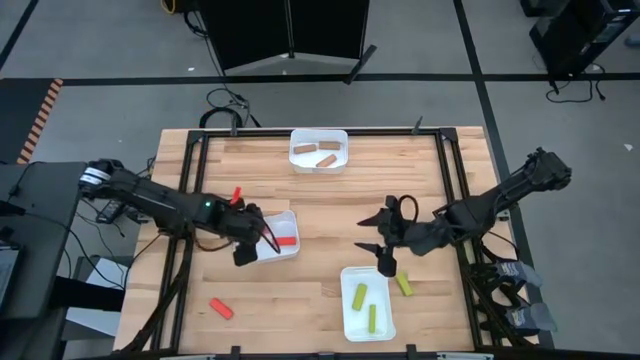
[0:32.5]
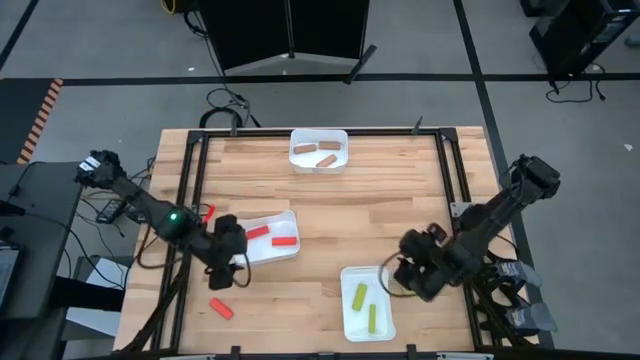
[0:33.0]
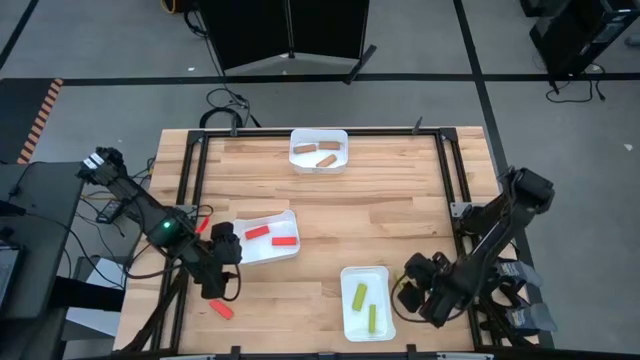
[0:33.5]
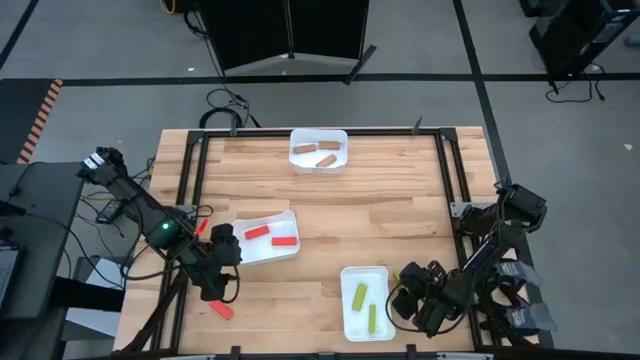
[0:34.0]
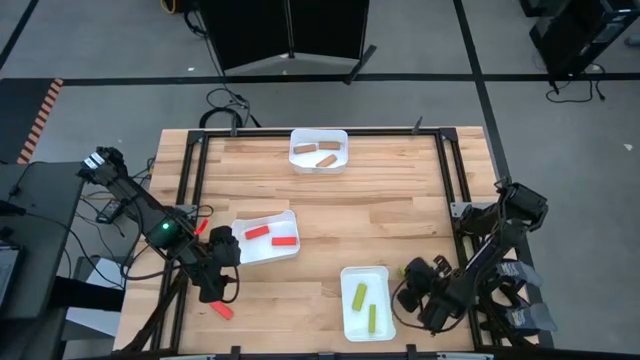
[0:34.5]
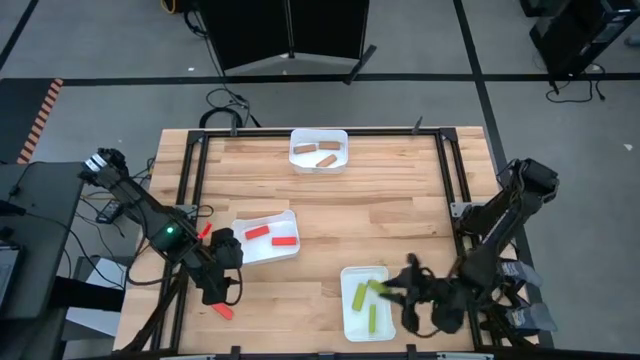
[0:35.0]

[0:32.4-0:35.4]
Task: Sort blocks
Put the yellow green block into the bottom white bin

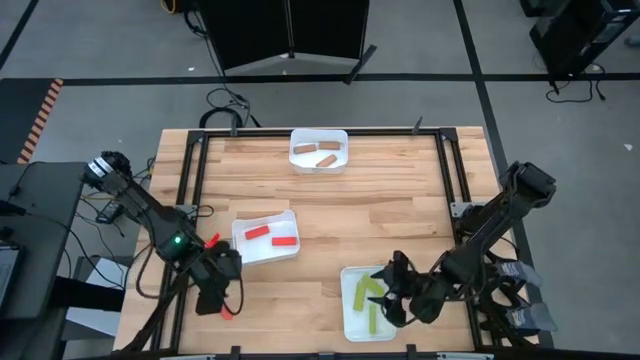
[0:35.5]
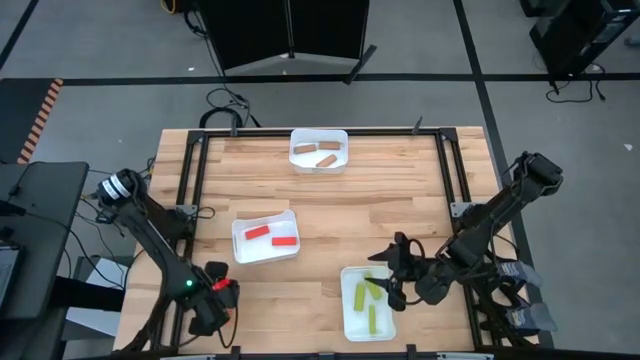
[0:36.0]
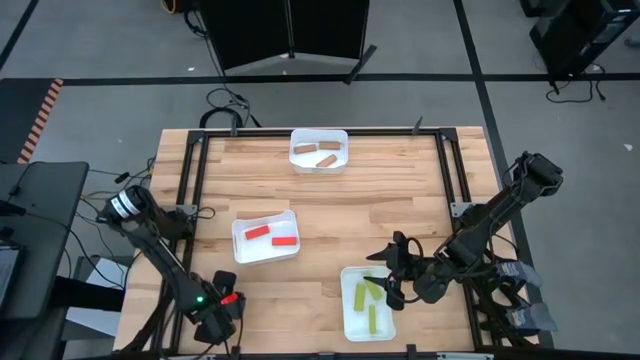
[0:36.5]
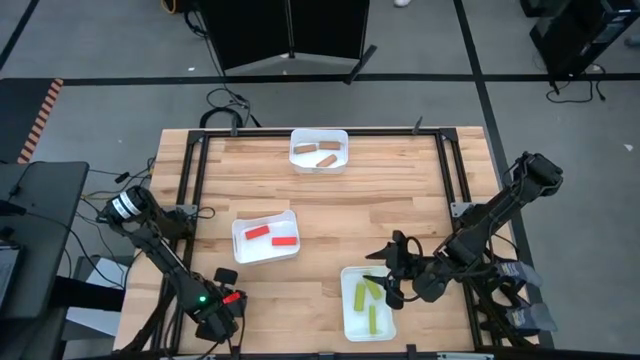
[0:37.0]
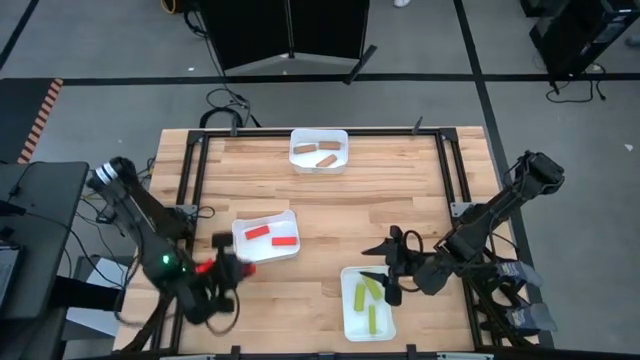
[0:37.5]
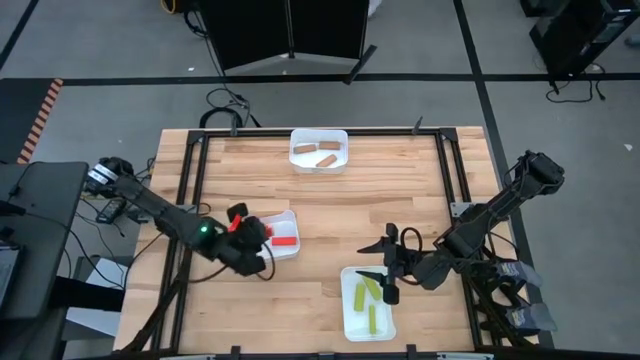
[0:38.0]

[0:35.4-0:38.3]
Put the orange block into the middle white bin

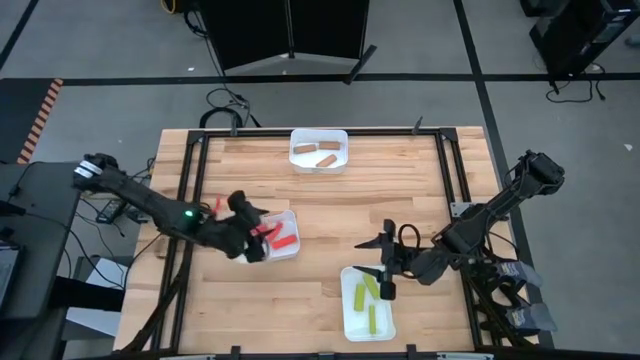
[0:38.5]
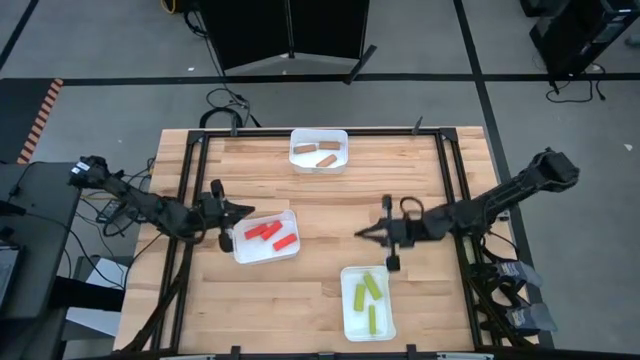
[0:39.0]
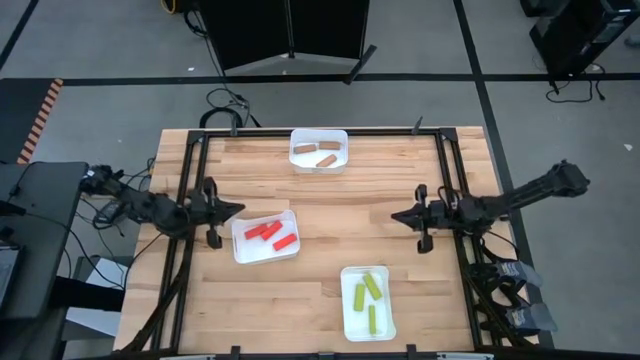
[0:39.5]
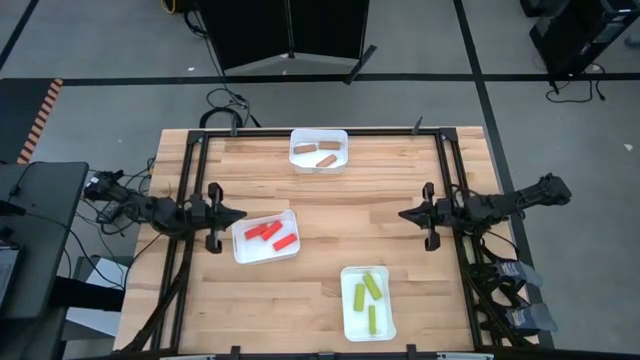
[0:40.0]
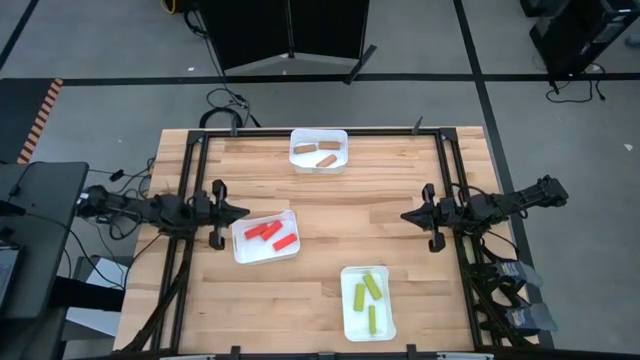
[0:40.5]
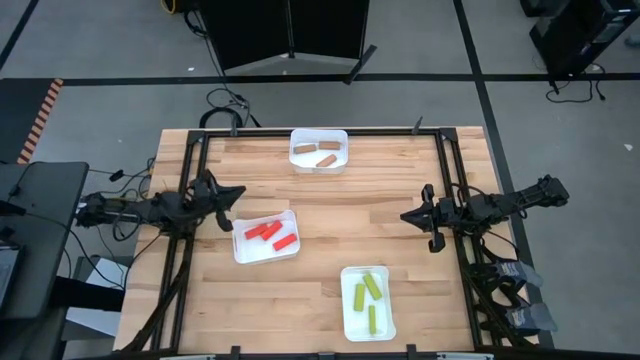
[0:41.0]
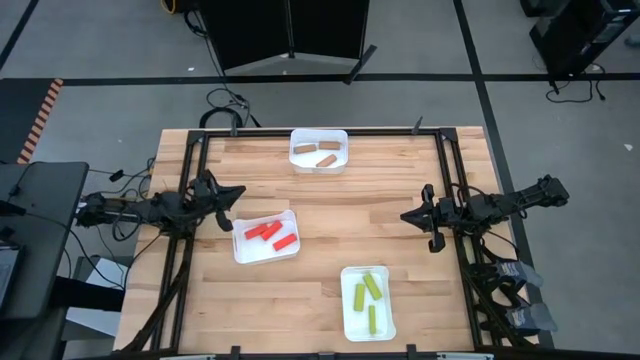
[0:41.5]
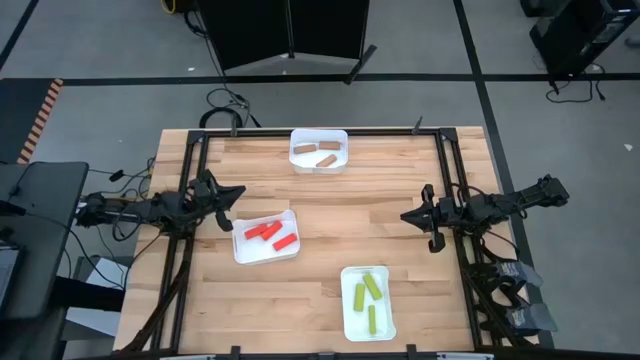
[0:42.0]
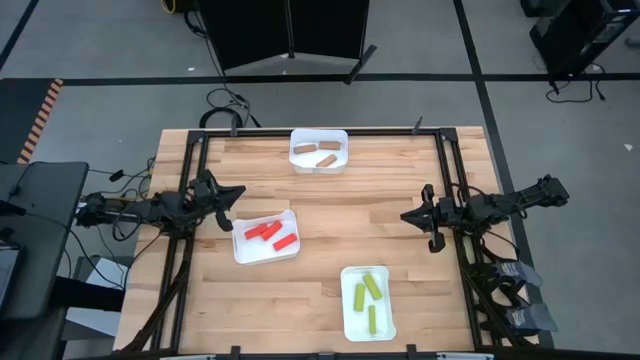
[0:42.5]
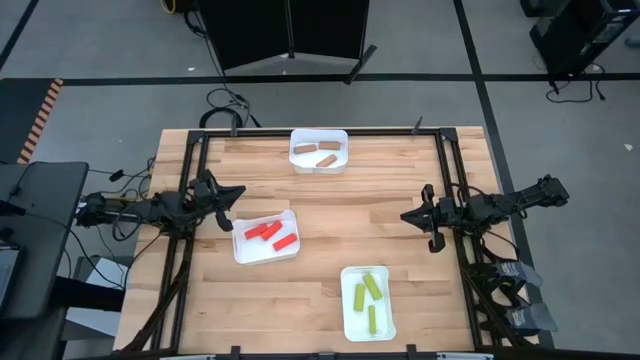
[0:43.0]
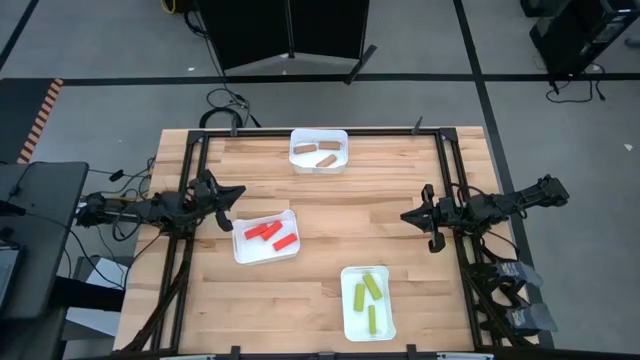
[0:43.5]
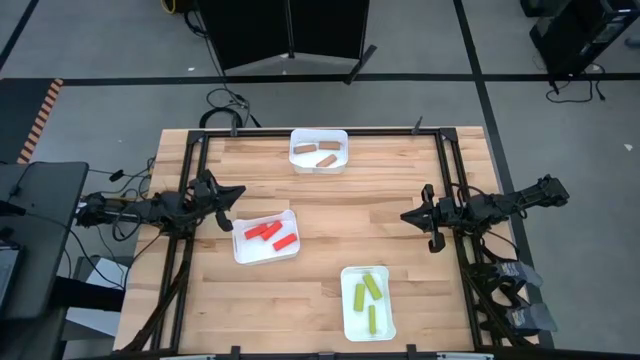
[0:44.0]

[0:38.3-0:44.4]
Return to Home Position

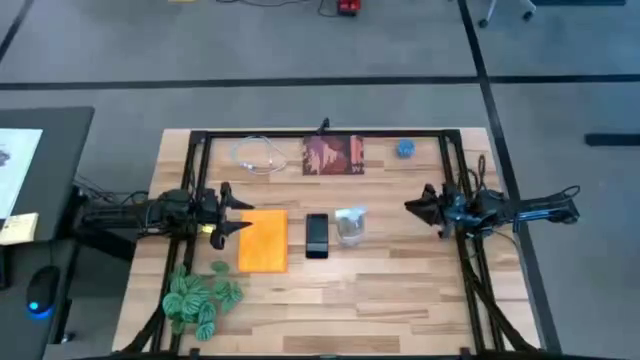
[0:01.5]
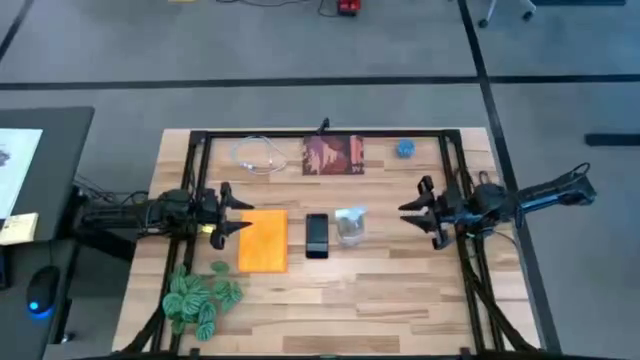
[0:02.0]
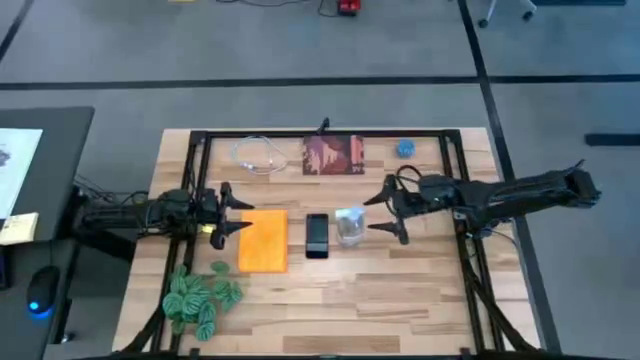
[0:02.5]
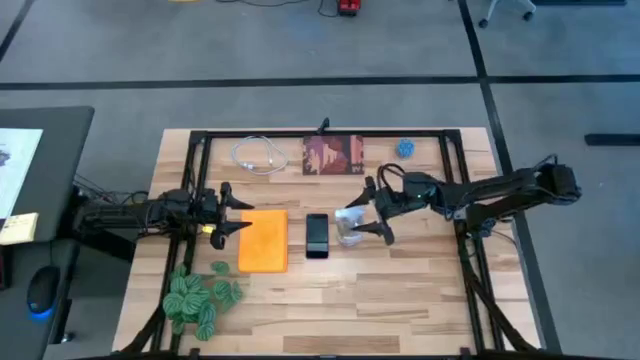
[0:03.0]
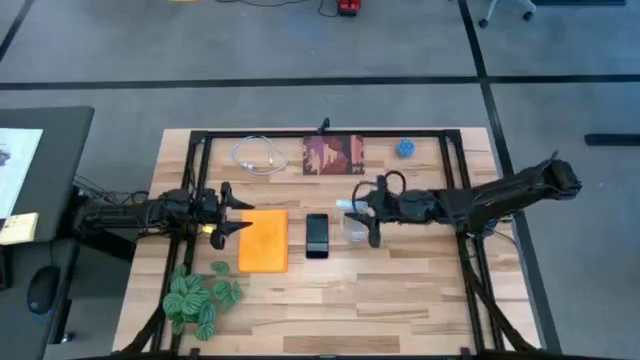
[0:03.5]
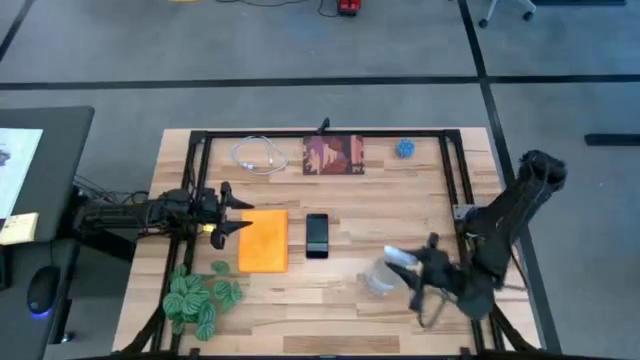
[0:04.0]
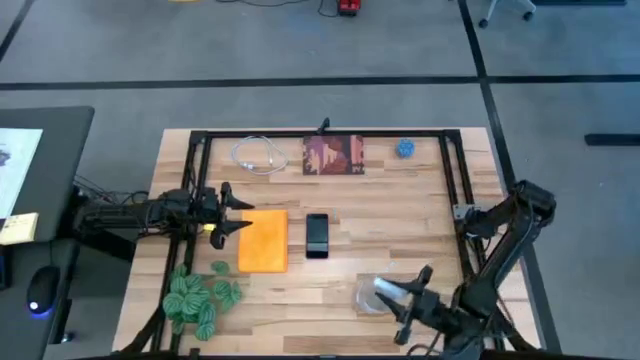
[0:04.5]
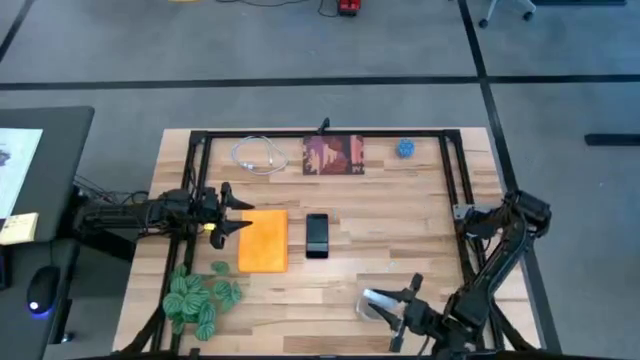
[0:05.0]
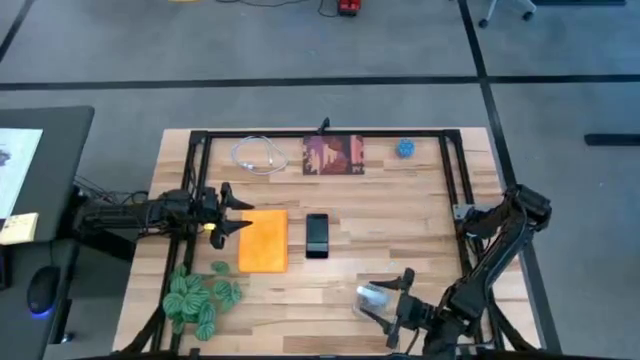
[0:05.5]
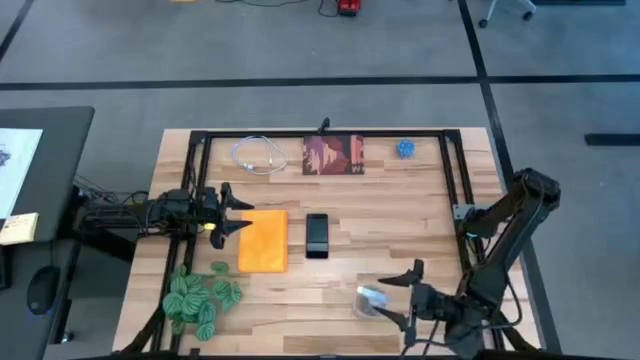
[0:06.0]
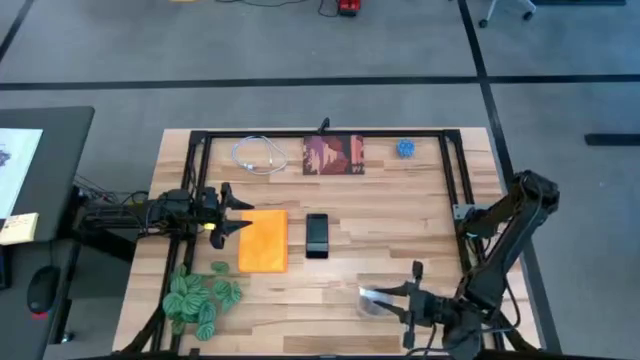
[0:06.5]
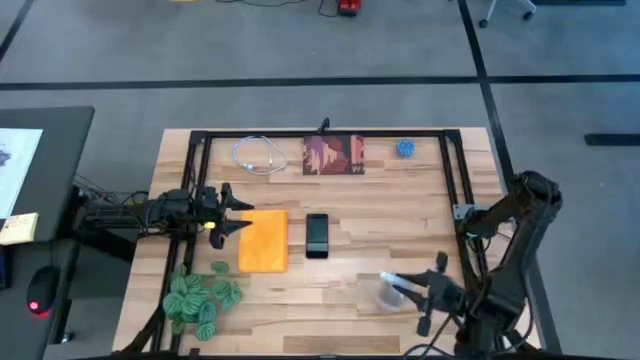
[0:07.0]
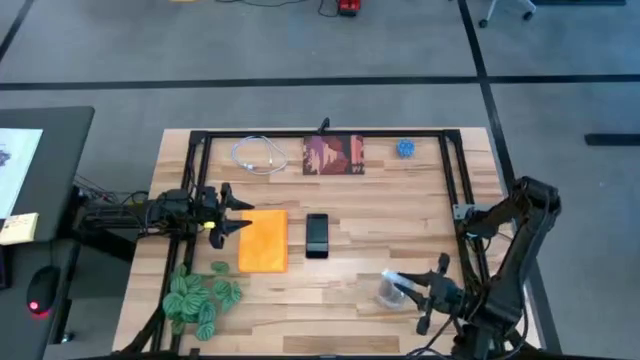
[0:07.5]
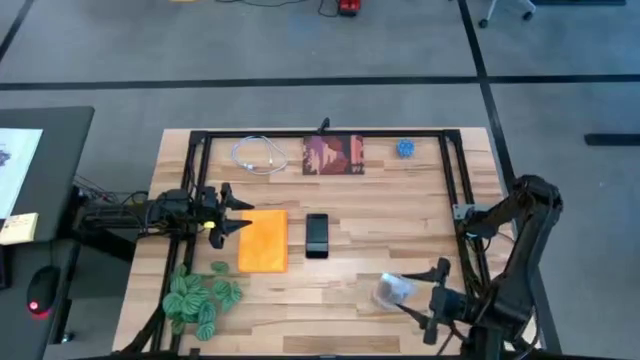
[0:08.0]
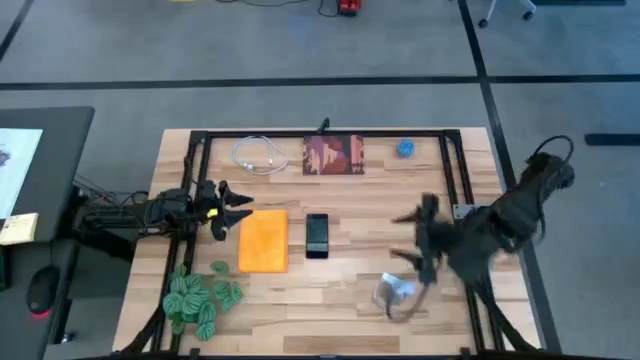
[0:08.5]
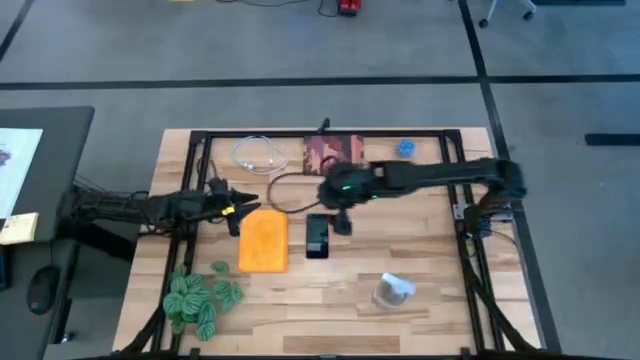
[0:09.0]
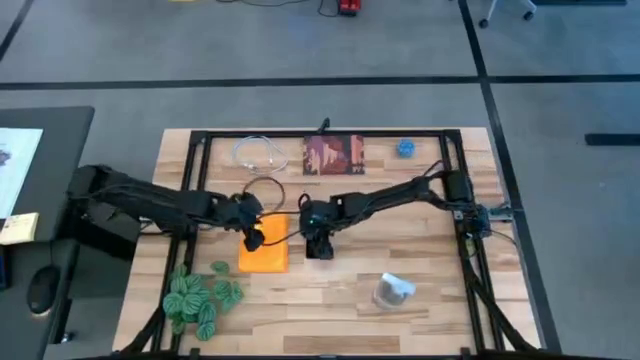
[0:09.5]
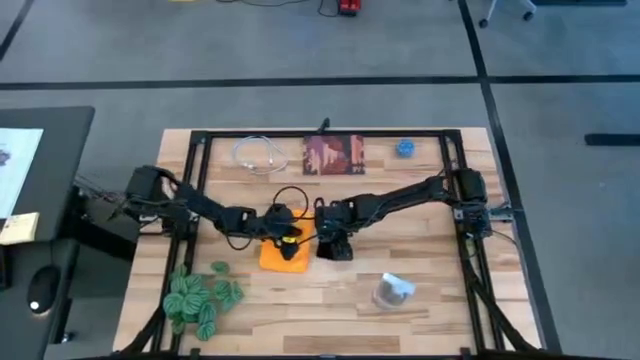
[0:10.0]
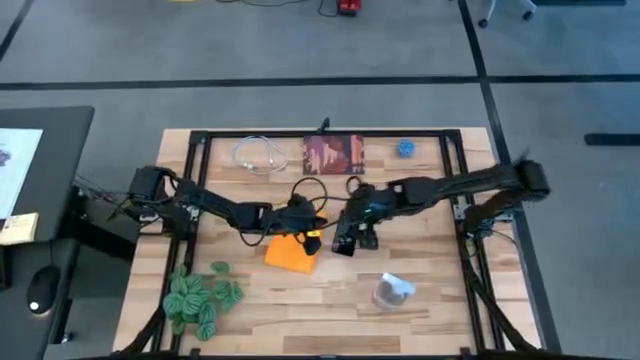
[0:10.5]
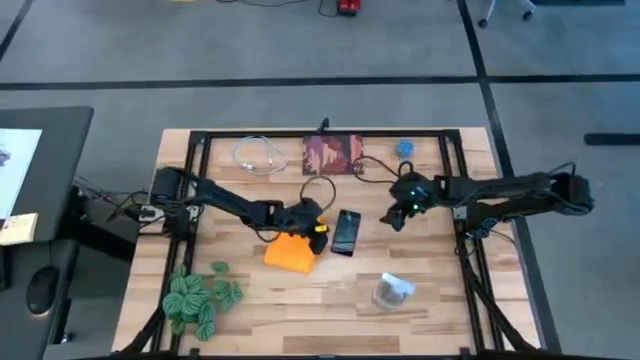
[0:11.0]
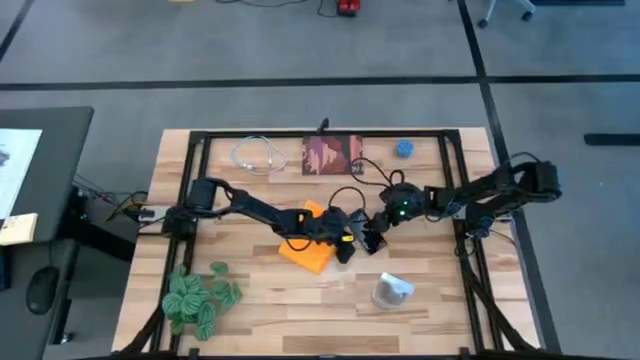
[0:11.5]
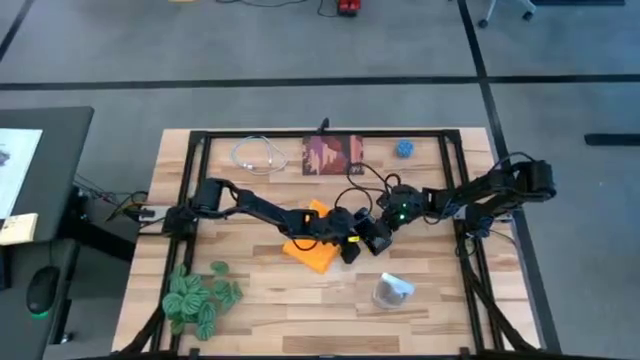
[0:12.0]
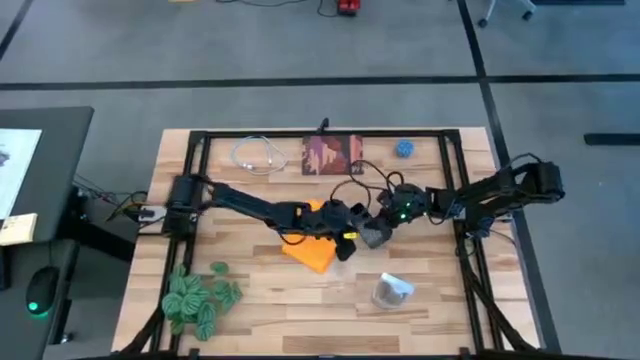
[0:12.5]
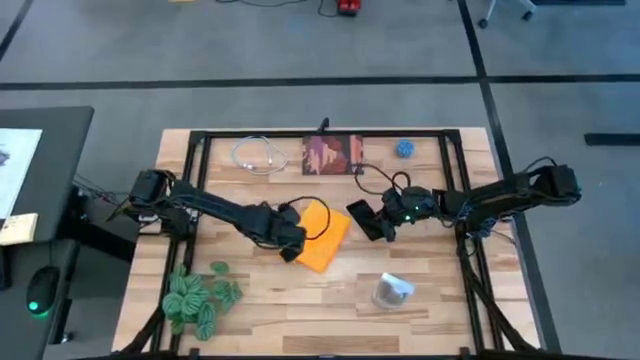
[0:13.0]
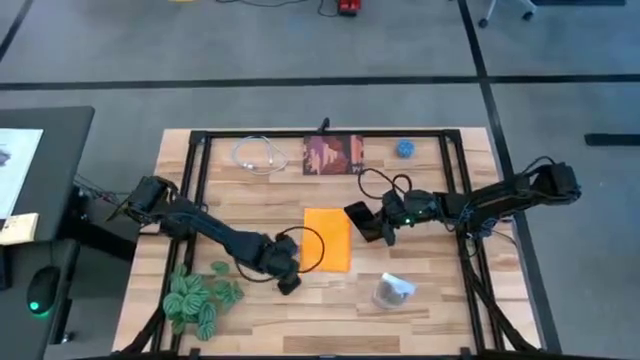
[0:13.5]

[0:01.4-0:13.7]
Task: Apply microfiber cloth
Spray the front of the pink cellphone with the spray bottle
